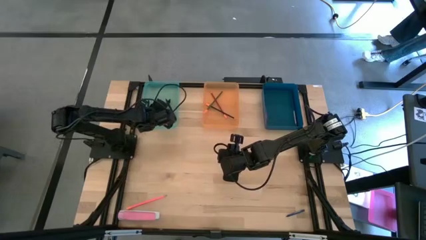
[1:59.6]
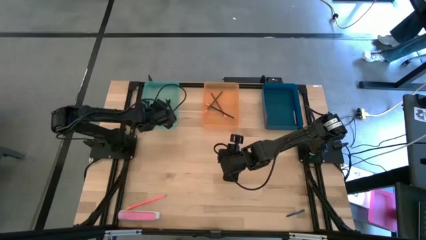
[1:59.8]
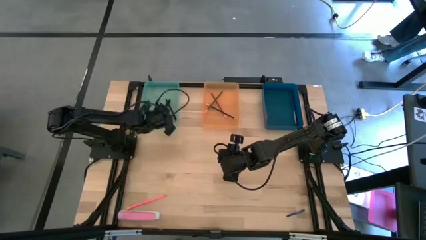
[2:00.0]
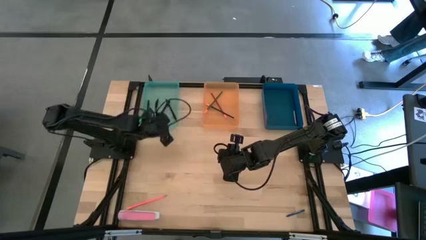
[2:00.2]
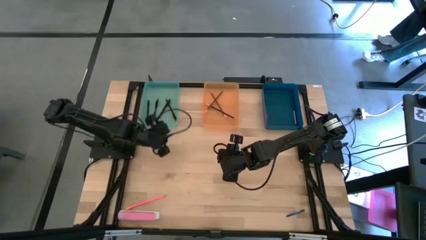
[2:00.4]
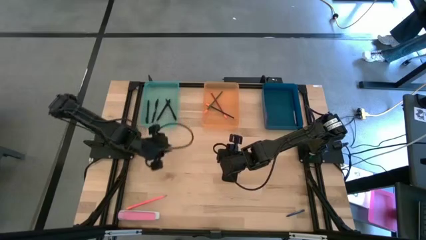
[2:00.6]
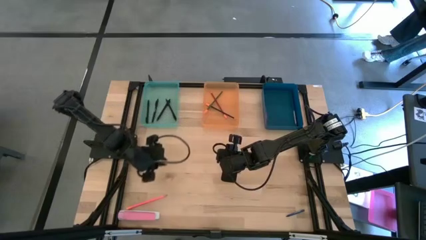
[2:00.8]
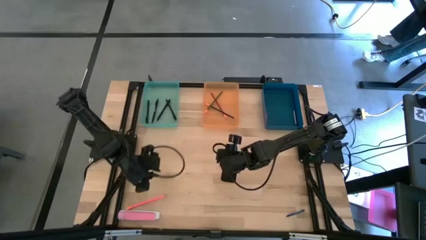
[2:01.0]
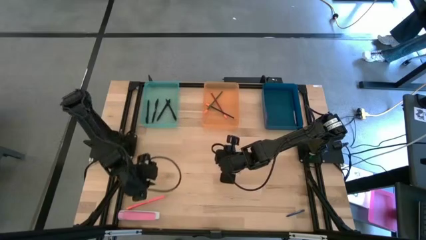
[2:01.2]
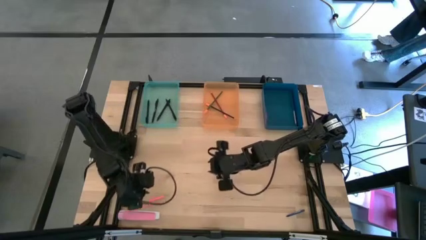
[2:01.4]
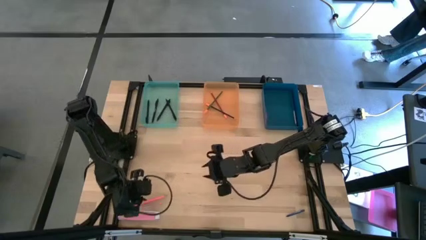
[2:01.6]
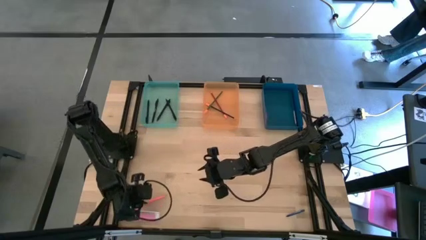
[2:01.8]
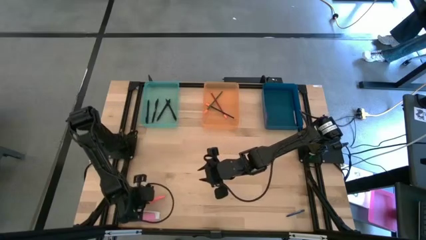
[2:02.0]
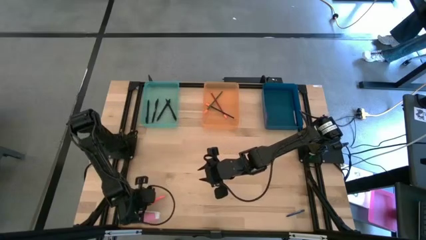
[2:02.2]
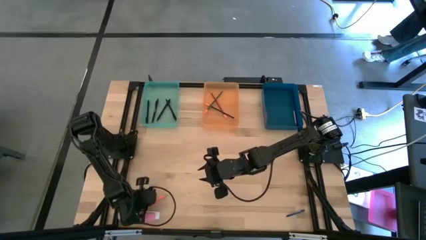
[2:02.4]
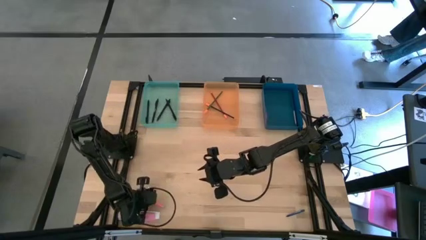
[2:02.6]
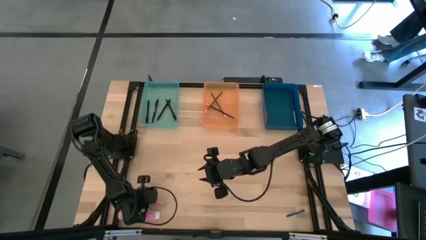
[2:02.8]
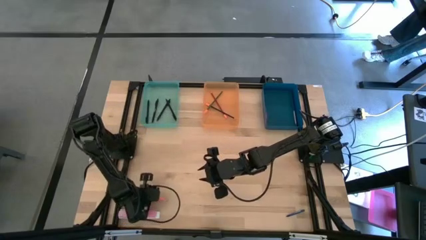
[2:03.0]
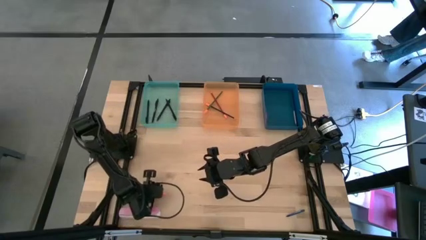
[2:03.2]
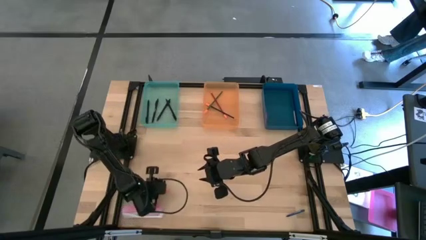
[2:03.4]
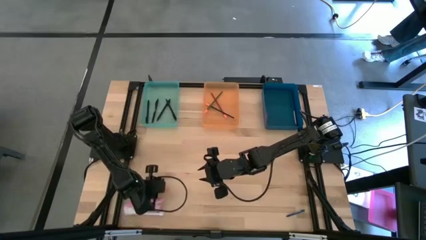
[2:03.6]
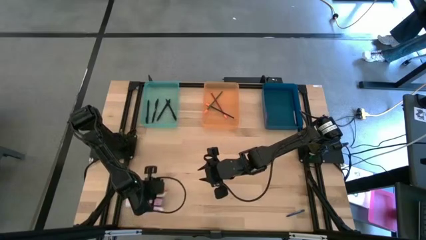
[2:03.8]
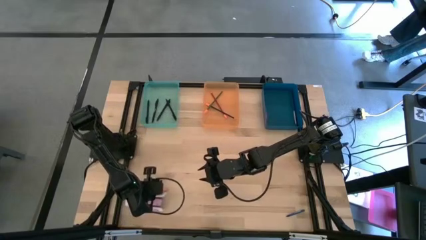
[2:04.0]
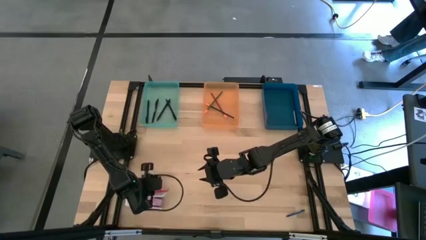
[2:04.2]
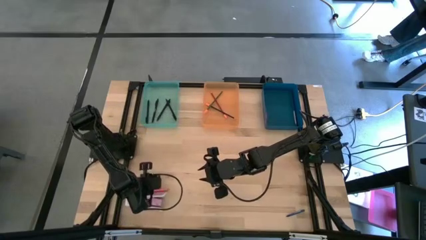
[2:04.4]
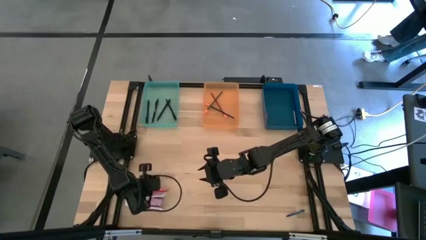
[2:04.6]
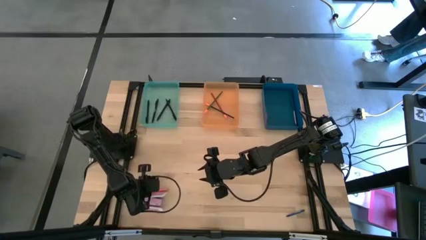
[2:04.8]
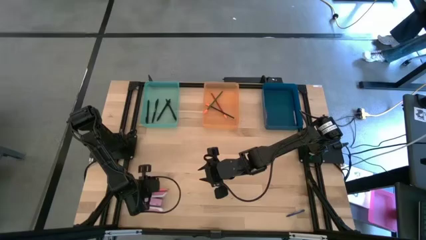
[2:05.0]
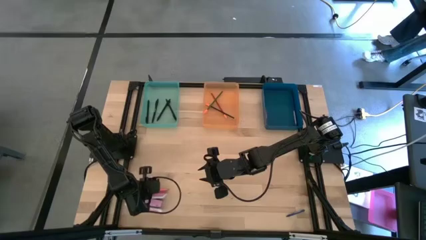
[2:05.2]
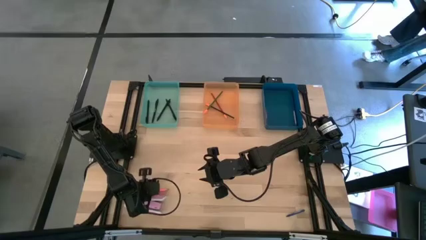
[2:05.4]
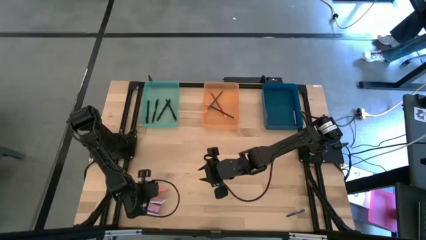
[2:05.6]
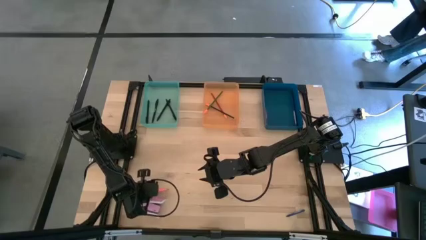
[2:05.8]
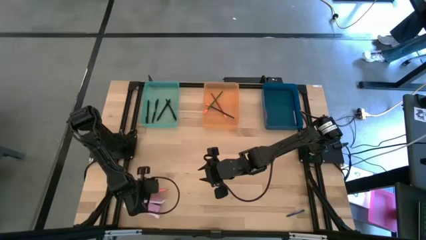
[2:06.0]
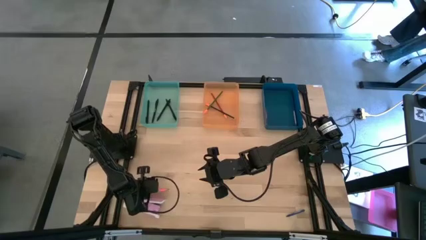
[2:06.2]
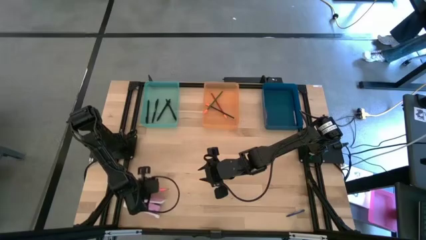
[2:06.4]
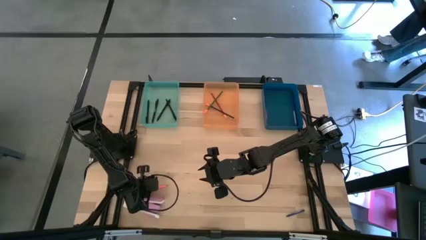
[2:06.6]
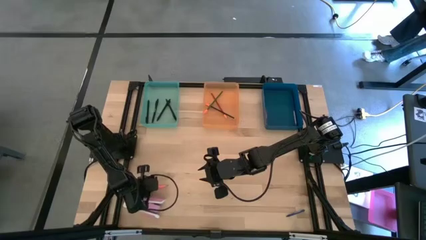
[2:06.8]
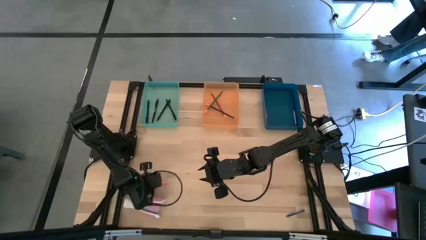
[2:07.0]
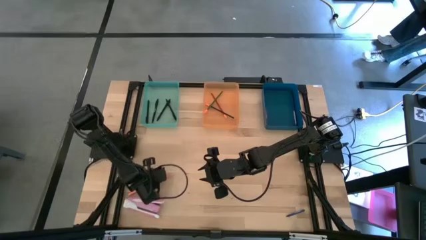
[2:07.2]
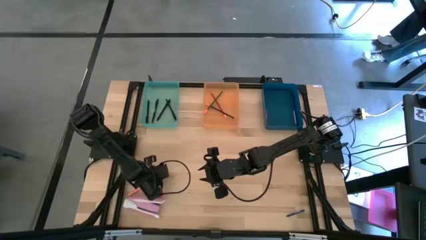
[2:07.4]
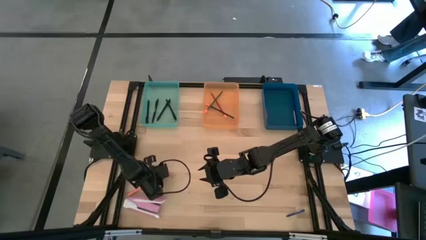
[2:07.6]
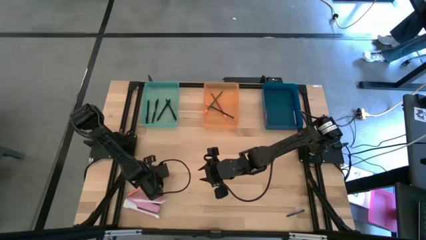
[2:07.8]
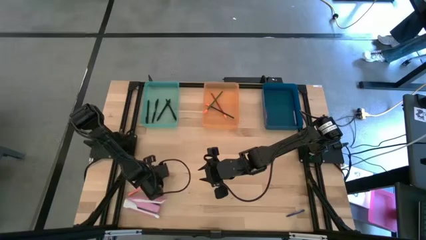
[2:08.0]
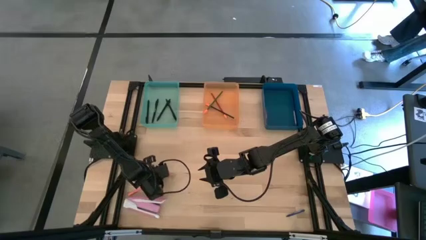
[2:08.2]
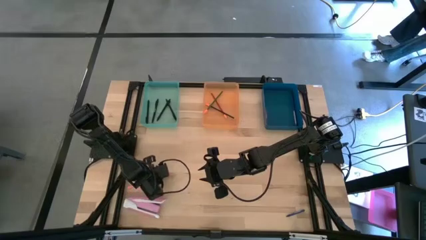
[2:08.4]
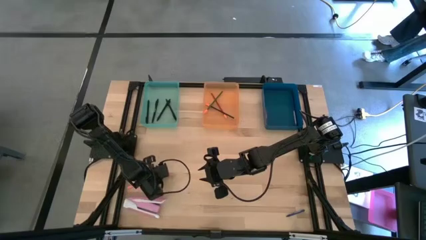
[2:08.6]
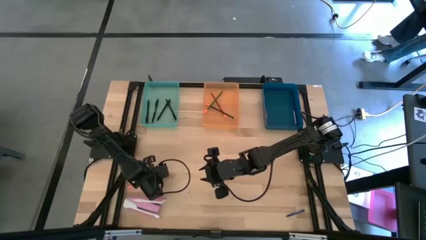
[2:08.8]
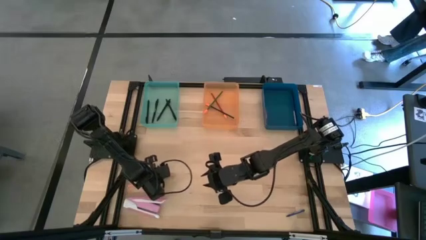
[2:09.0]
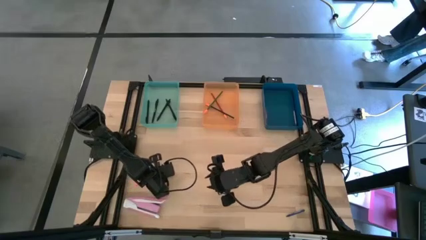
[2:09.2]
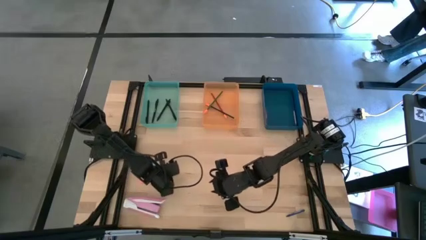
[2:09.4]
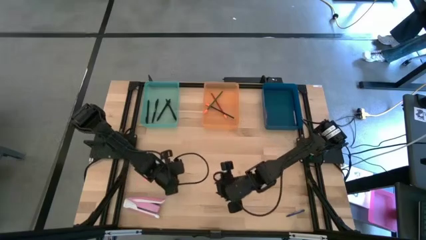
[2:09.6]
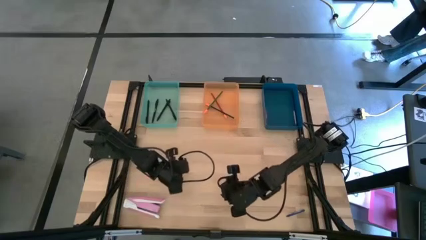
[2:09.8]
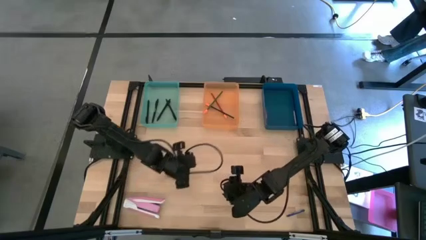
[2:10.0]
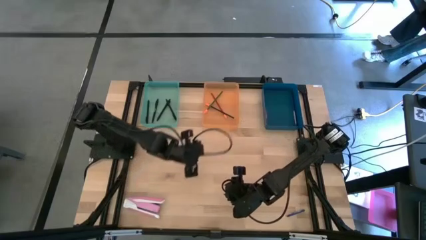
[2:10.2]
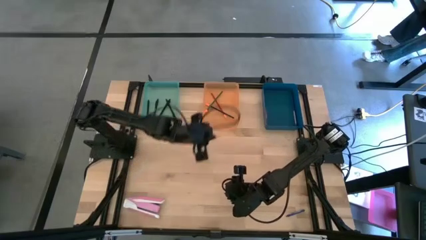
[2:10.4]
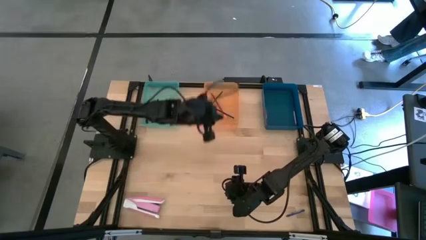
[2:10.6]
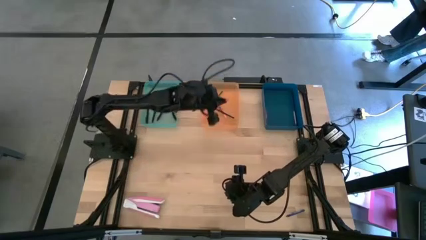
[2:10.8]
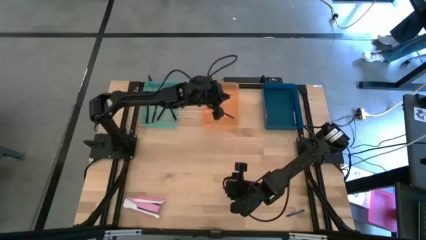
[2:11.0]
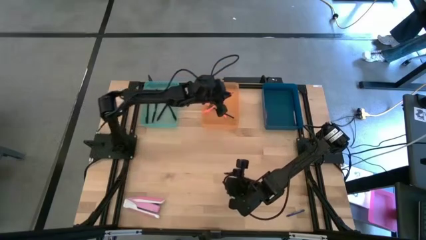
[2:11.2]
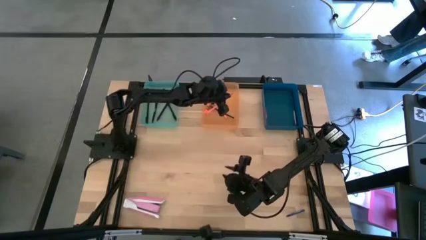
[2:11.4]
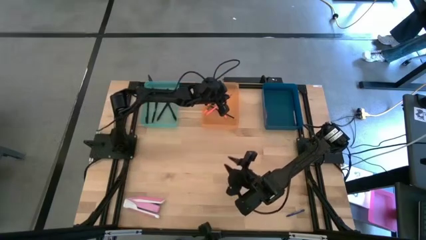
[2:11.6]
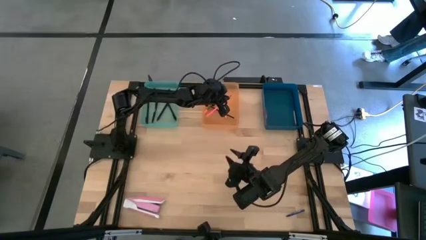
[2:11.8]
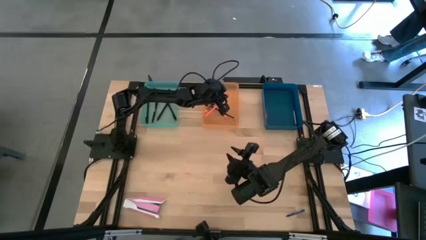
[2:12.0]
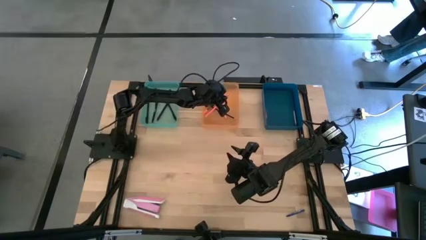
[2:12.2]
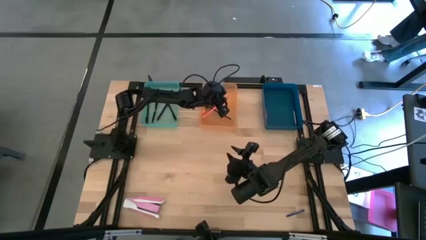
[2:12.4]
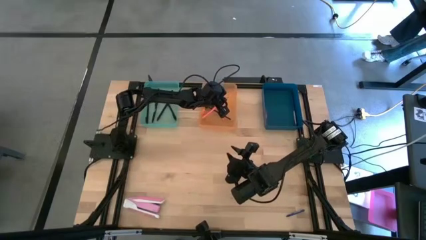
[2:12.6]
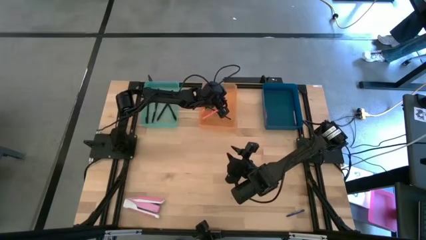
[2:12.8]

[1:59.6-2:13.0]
Task: Sort crayons/erasers/pens/pencils in bins
Put the pink pencil into the orange bin
